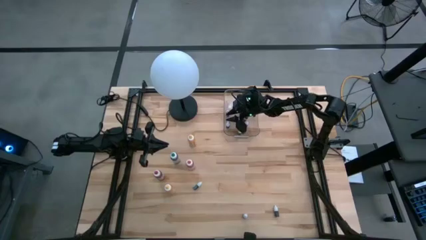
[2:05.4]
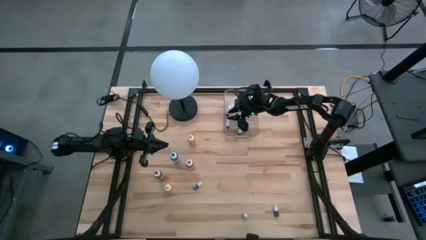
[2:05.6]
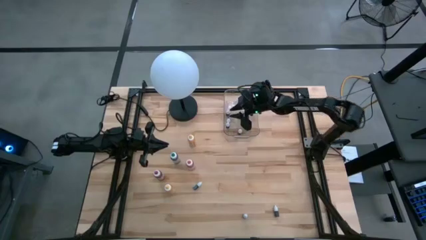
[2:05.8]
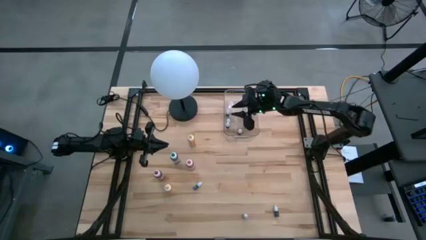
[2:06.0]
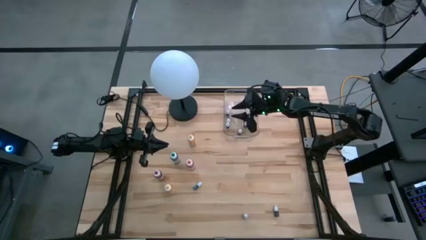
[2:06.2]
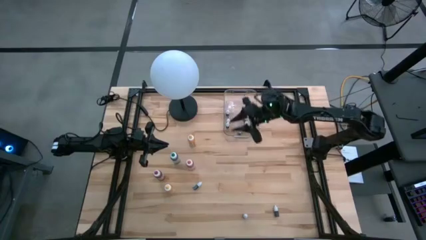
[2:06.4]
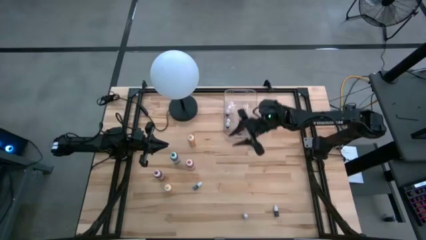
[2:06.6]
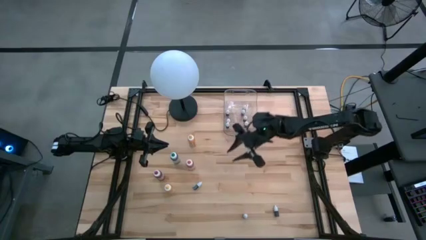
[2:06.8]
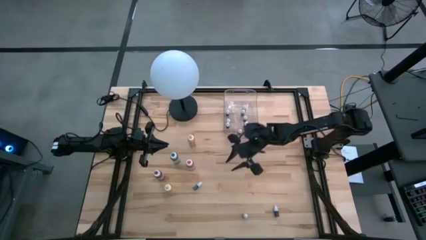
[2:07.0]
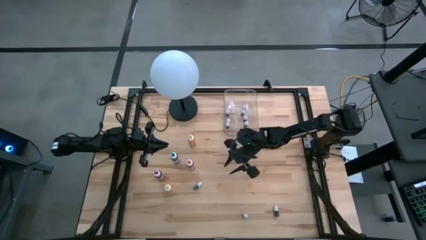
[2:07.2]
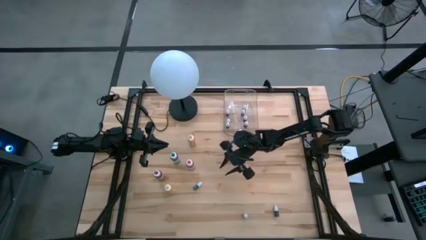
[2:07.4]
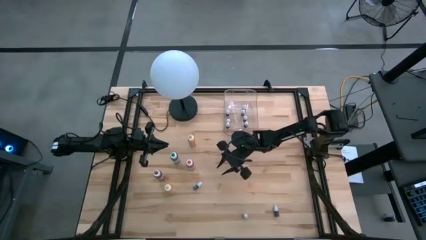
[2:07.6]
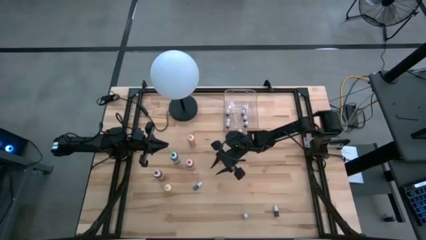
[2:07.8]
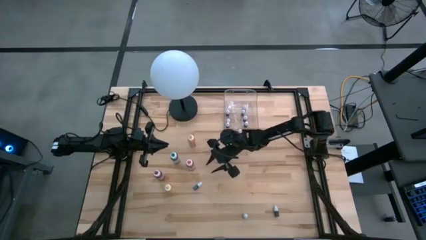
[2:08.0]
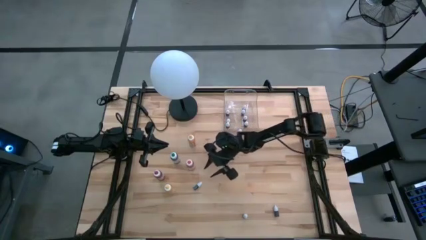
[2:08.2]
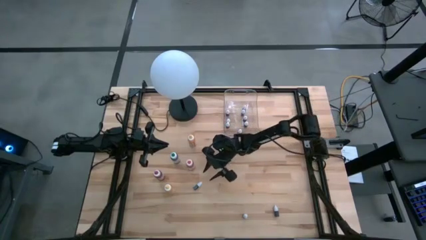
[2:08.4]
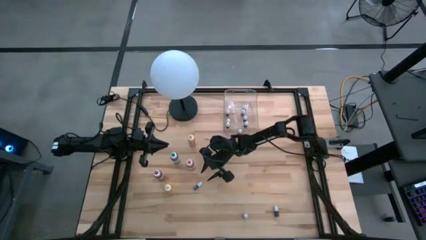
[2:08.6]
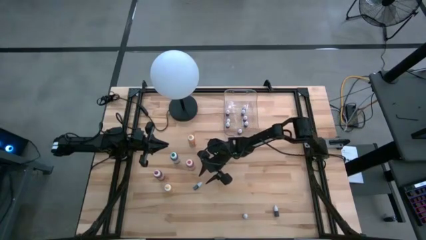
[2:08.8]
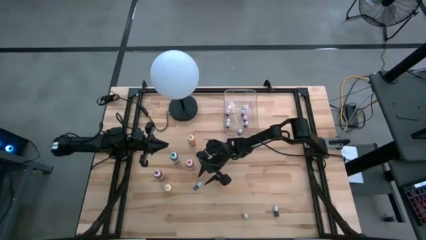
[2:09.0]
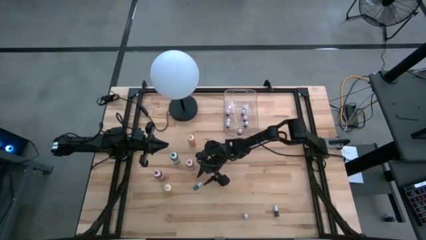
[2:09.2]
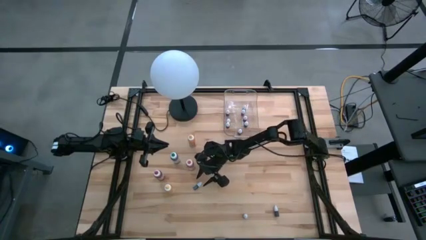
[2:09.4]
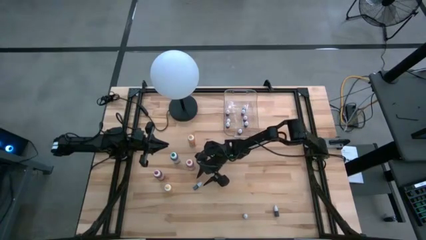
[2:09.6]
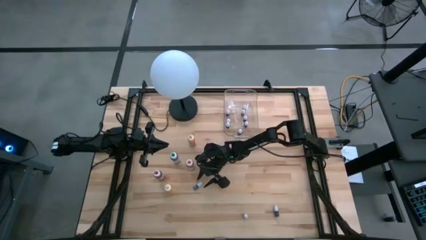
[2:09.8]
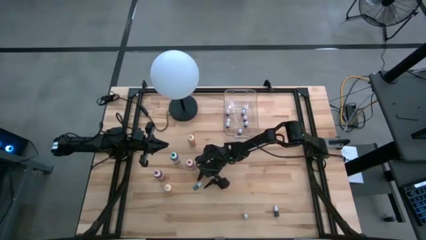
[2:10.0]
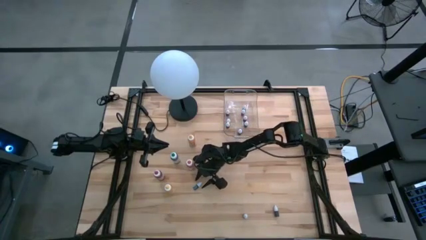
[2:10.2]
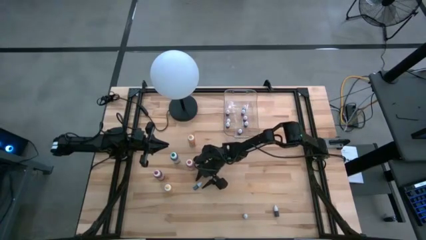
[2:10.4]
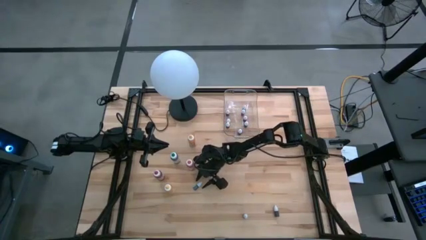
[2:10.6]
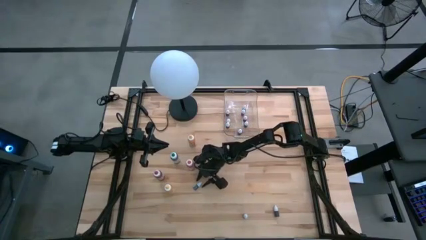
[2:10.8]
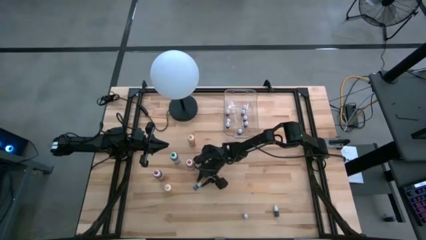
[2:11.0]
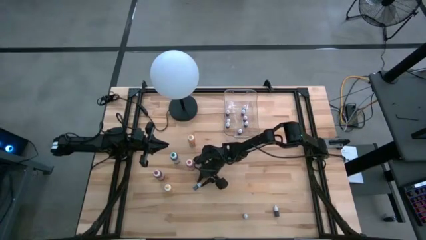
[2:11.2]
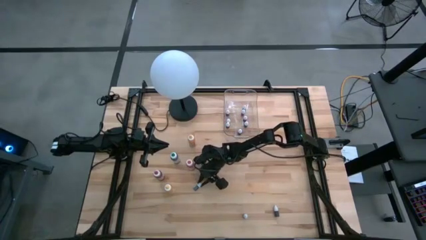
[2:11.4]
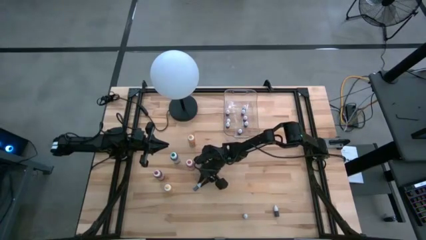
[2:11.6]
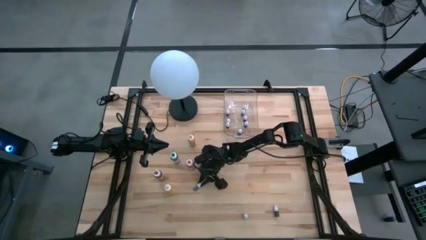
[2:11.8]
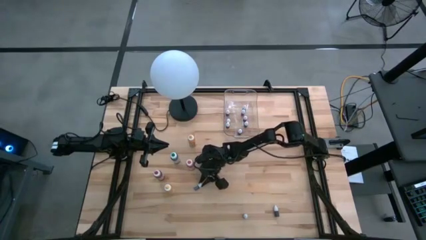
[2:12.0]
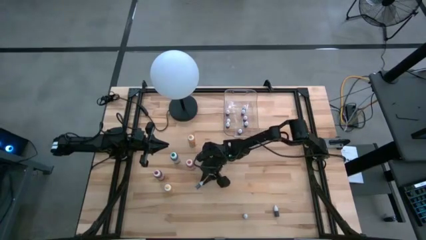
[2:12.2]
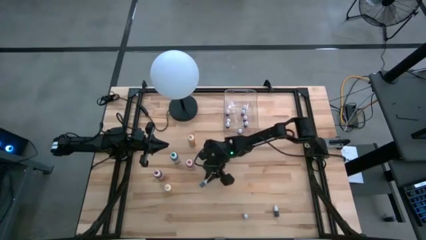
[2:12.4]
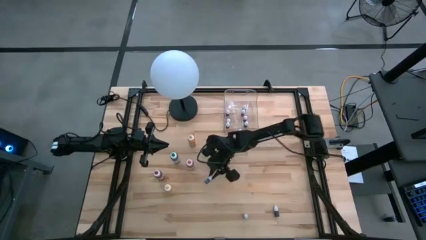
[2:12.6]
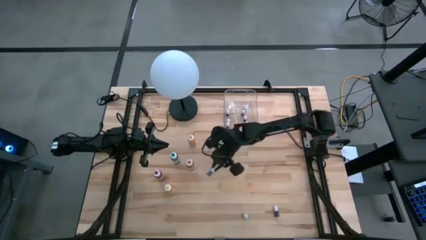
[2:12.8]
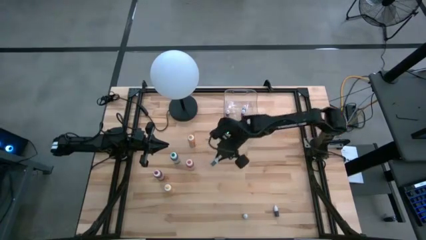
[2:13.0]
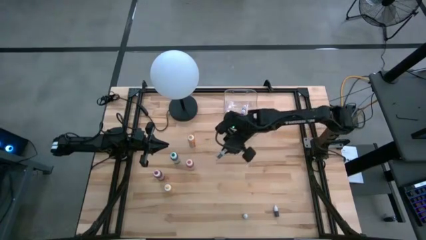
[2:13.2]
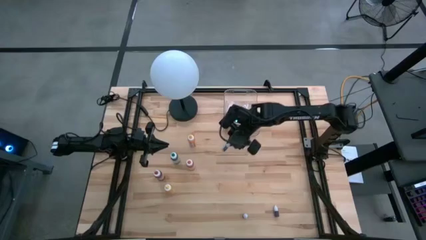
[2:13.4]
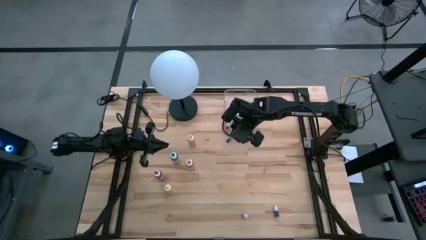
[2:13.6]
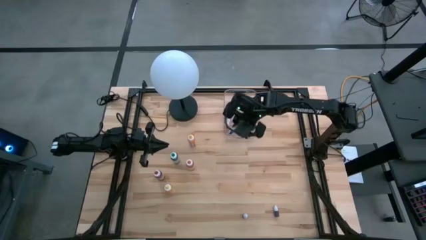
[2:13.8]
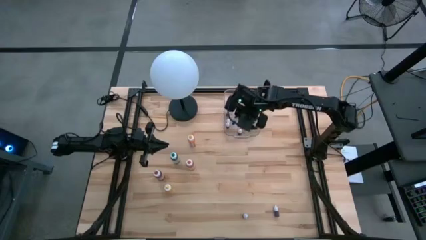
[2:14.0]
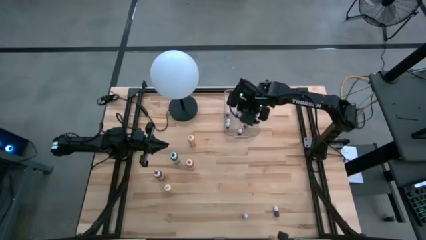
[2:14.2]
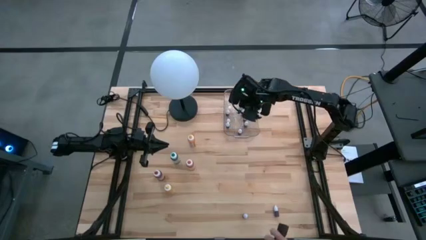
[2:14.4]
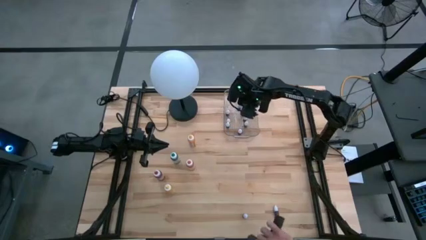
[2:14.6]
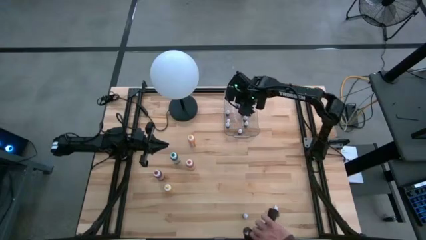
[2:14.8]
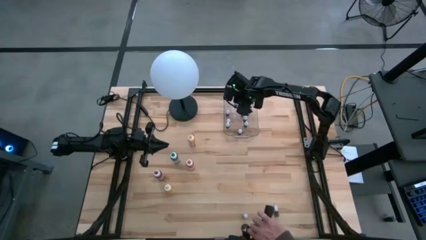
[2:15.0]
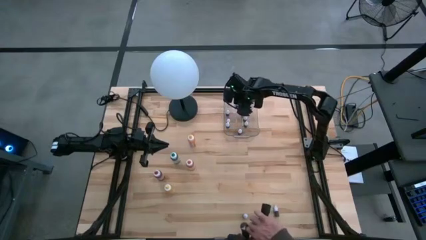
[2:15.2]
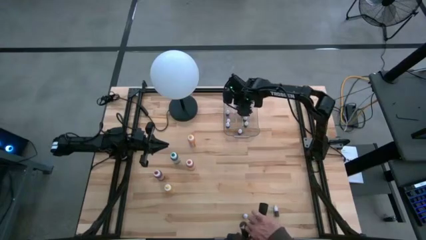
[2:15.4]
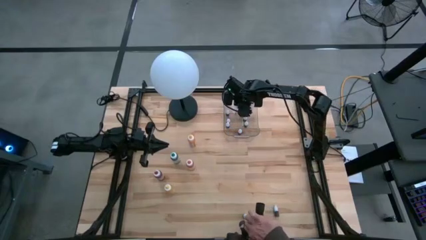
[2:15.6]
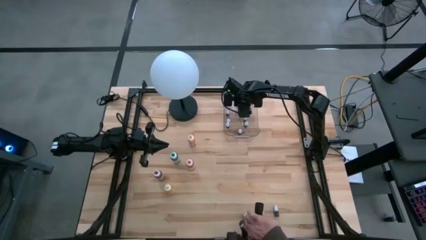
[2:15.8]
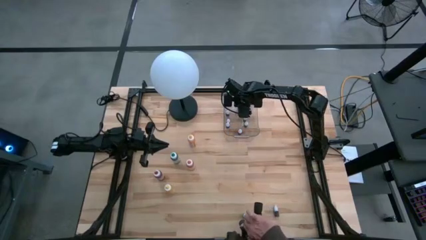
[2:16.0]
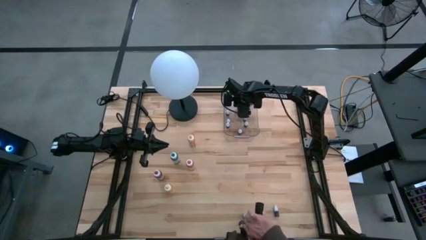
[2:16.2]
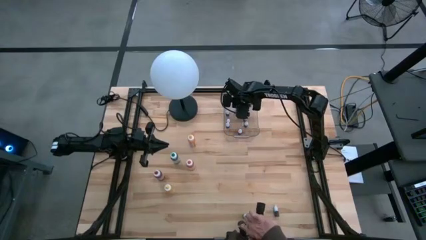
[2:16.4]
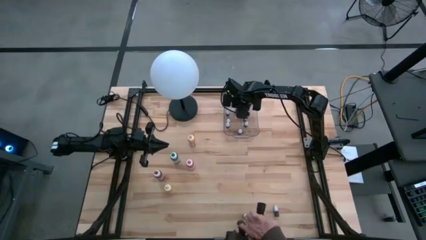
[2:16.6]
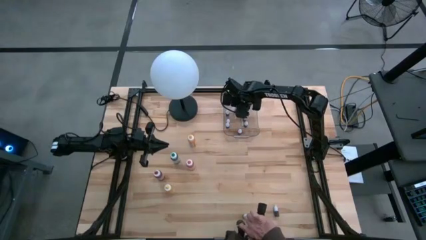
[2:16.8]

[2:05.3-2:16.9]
Task: Pick & Place food coloring
Put the small black food coloring bottle into the transparent bin

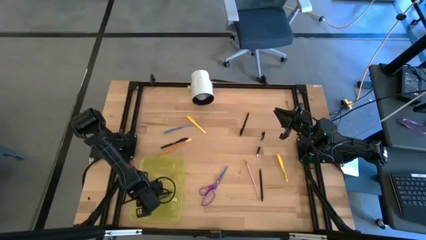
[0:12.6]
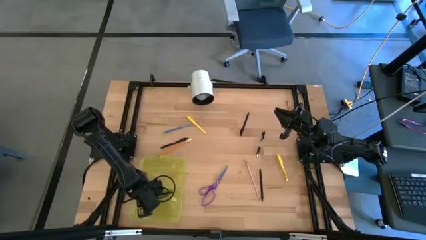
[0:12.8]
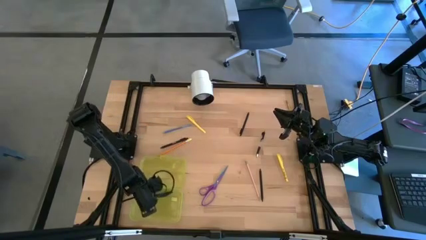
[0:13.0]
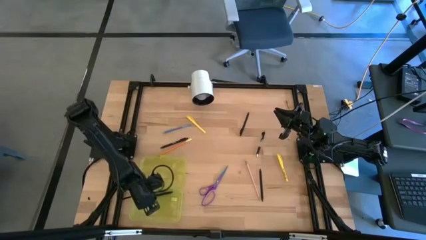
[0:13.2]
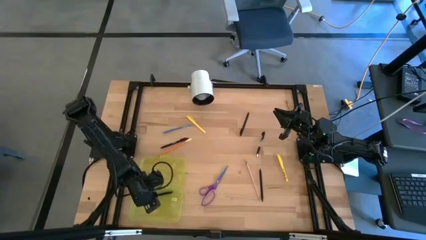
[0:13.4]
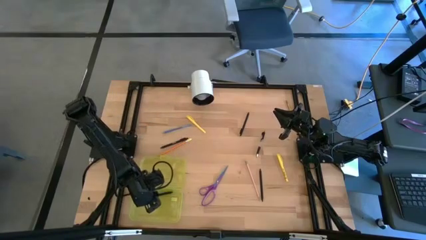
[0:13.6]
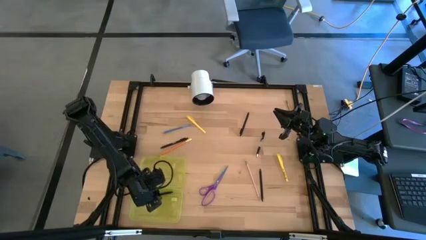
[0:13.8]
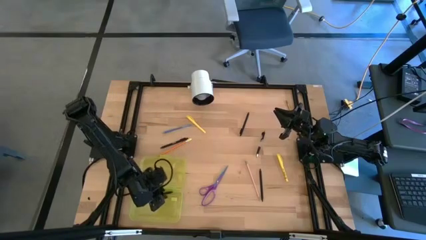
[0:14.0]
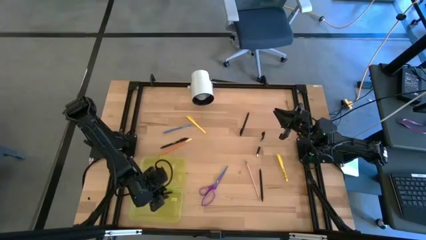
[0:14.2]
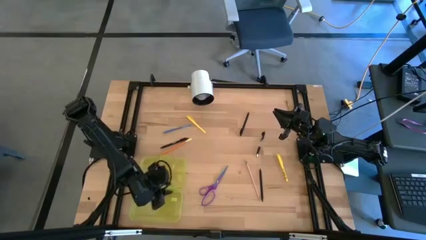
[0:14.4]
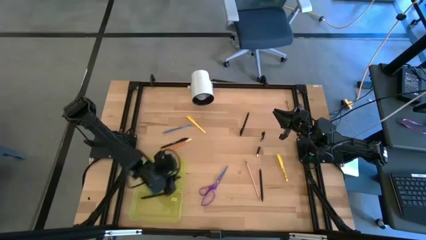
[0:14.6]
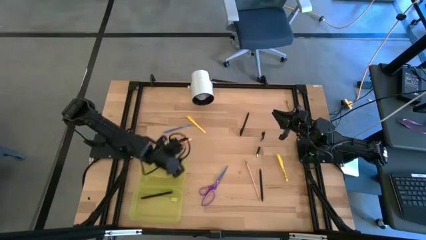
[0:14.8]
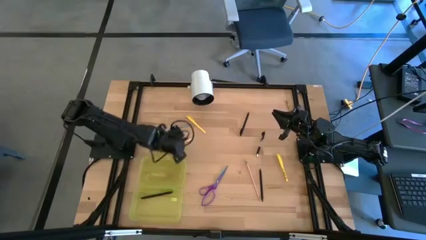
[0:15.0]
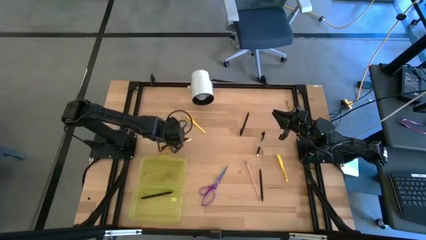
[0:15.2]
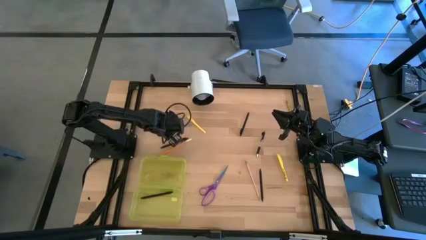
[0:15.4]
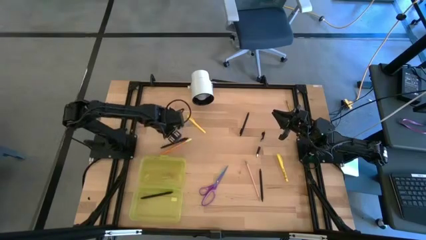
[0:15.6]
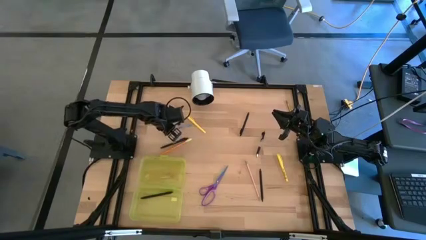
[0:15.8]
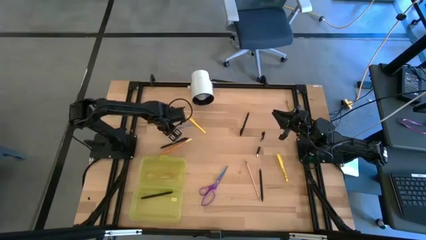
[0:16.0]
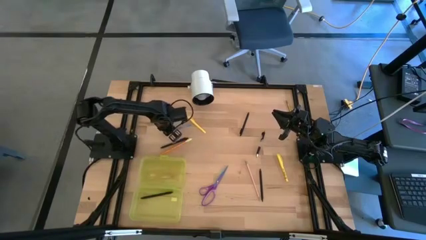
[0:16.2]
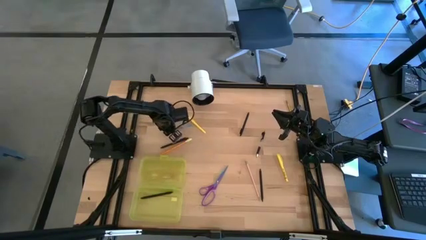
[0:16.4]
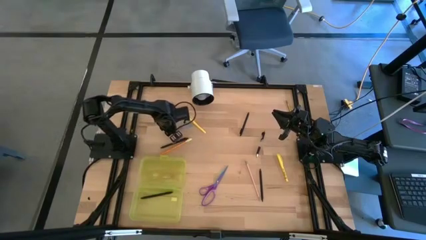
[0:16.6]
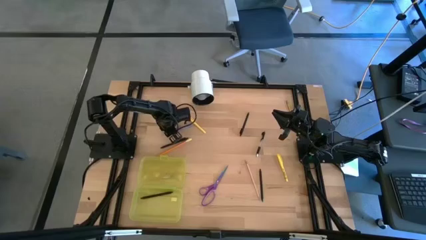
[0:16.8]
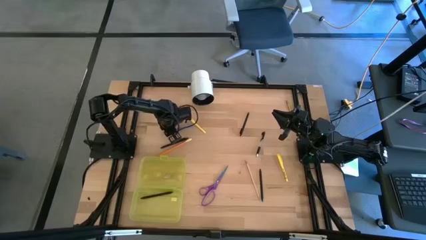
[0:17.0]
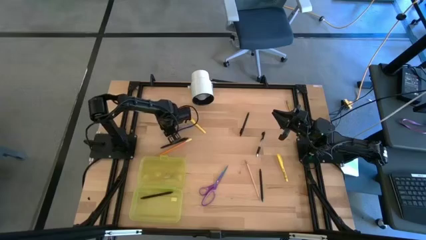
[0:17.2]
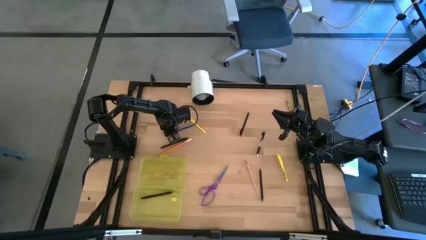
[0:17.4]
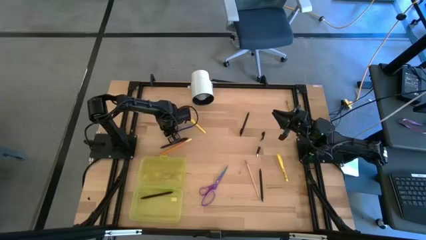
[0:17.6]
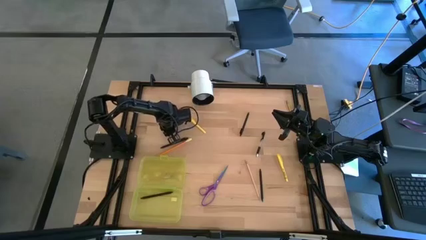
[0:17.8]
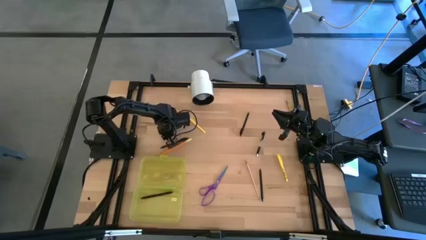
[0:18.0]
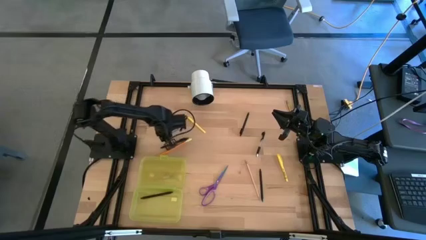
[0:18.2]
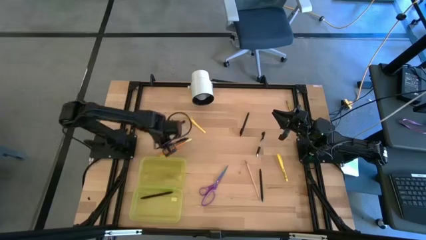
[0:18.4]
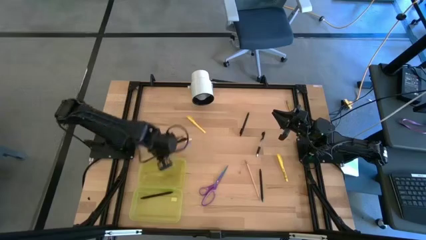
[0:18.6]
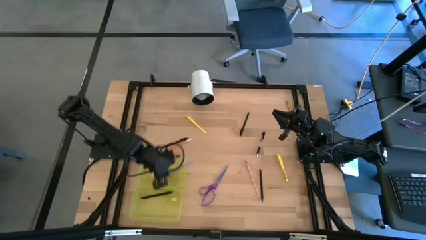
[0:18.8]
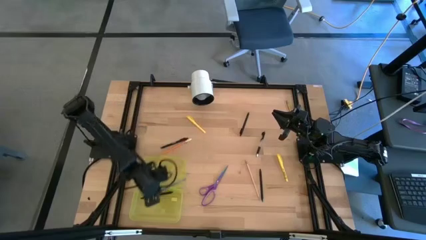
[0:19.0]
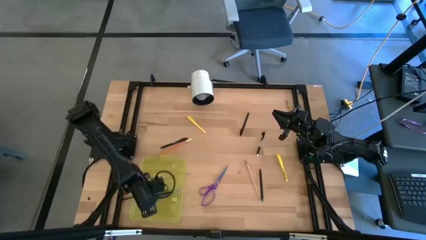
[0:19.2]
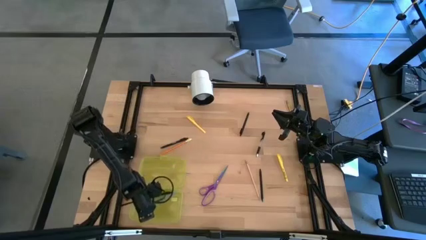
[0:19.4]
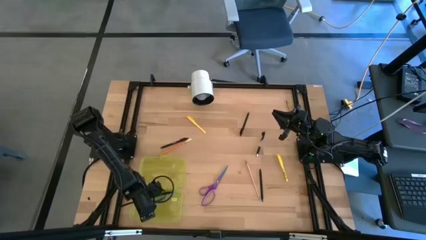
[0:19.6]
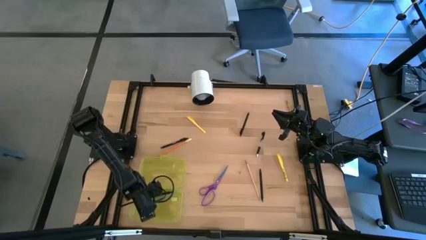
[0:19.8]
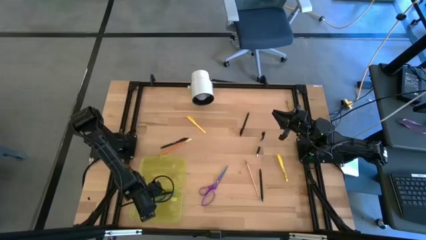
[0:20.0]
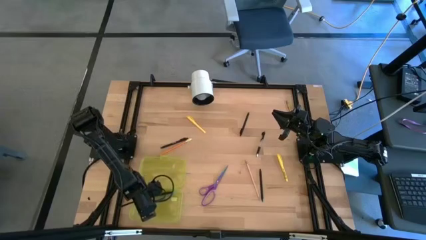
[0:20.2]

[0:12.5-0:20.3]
Task: Pick & place school supplies into a supply box
Put the blue pen into the yellow supply box
